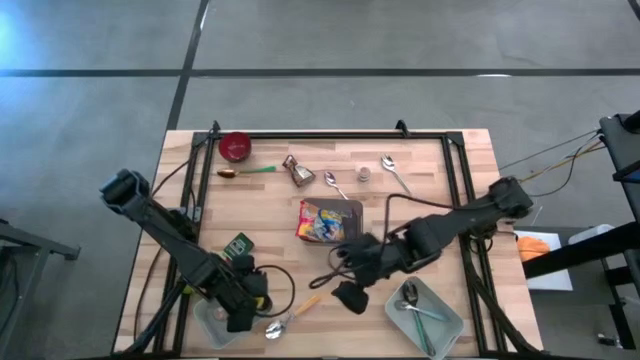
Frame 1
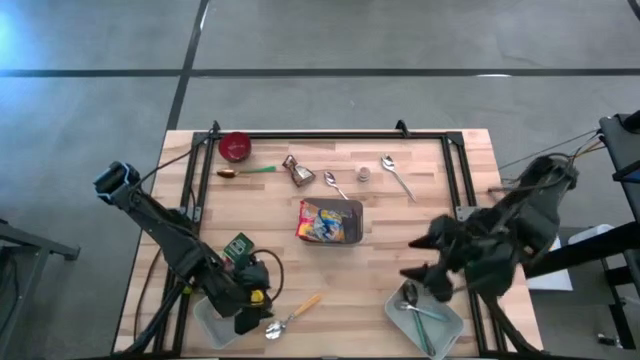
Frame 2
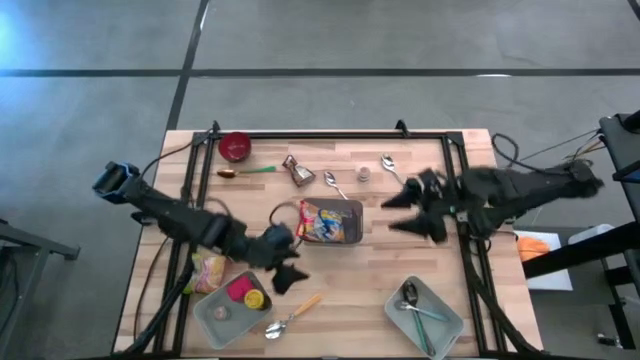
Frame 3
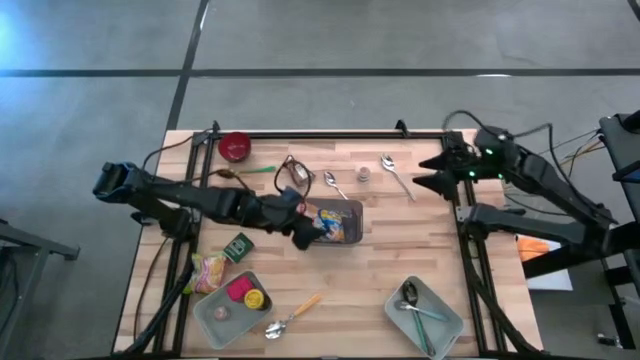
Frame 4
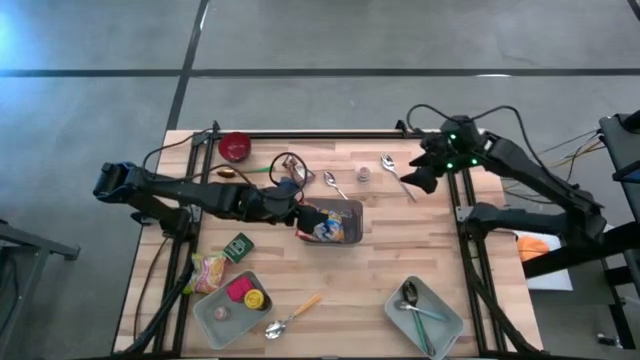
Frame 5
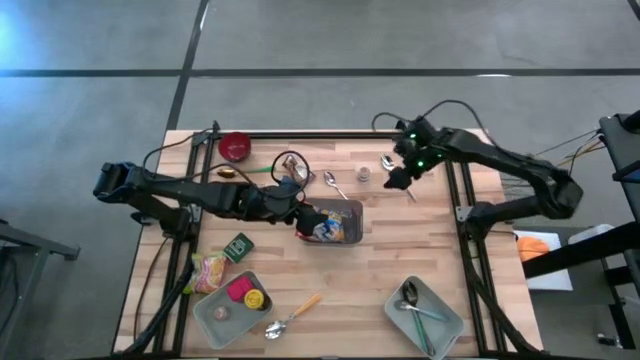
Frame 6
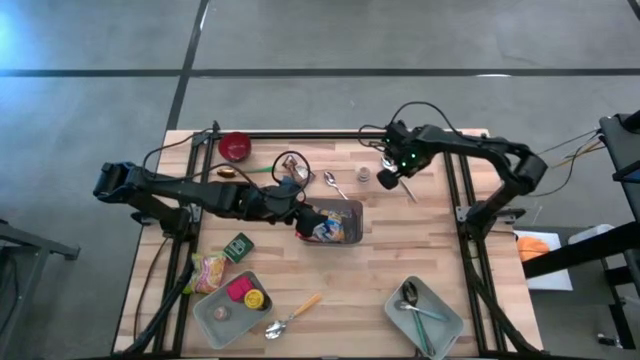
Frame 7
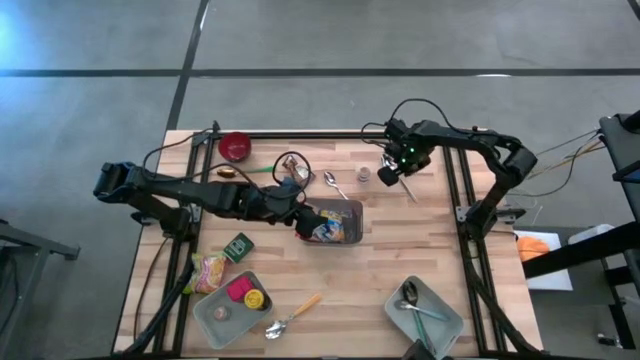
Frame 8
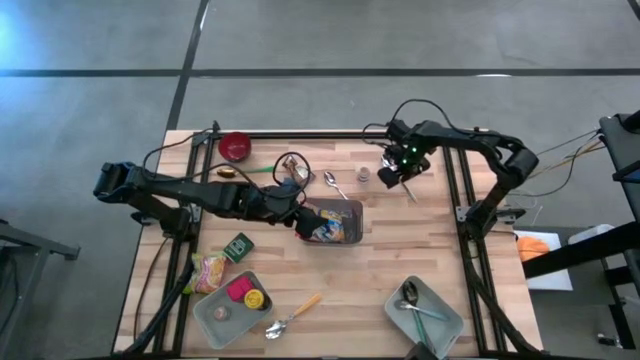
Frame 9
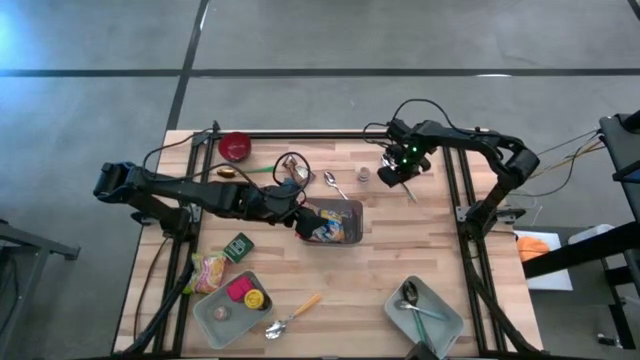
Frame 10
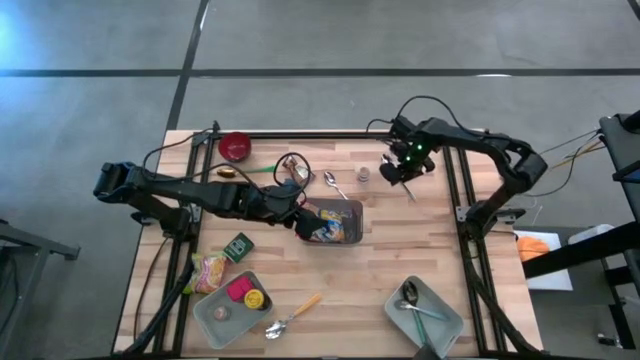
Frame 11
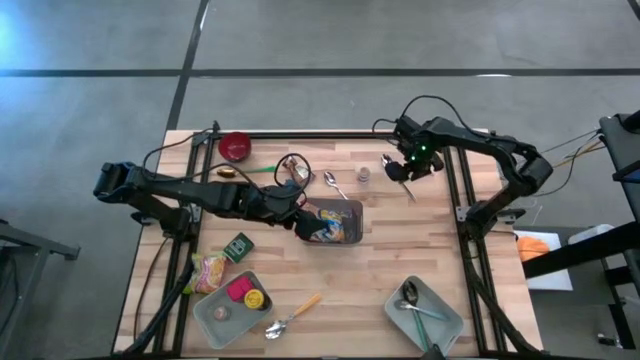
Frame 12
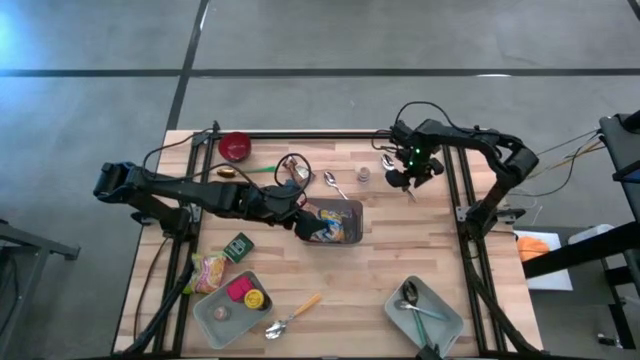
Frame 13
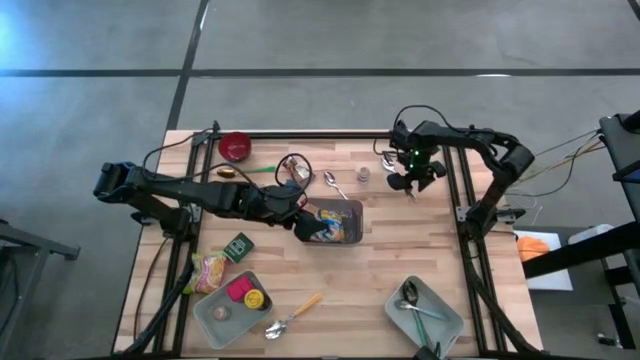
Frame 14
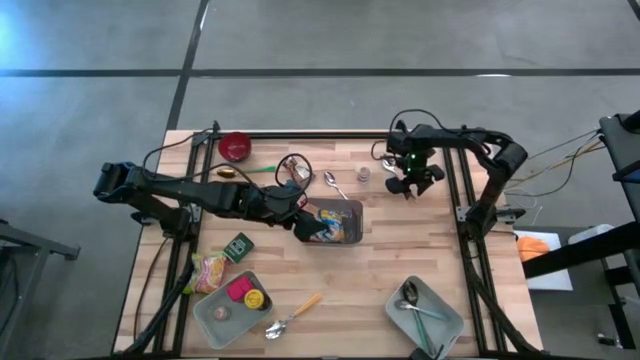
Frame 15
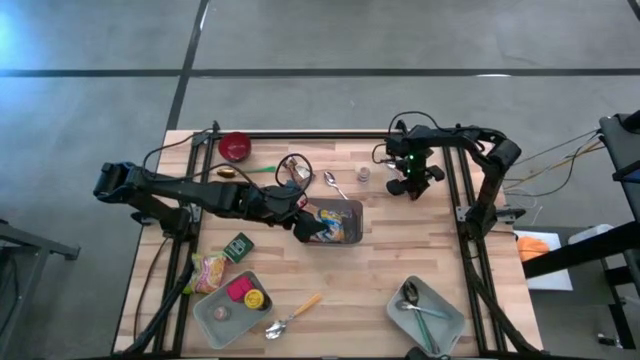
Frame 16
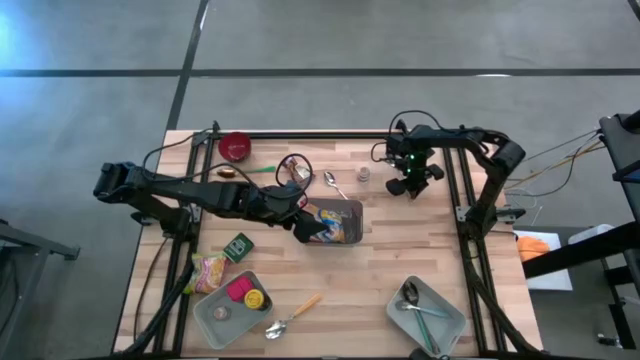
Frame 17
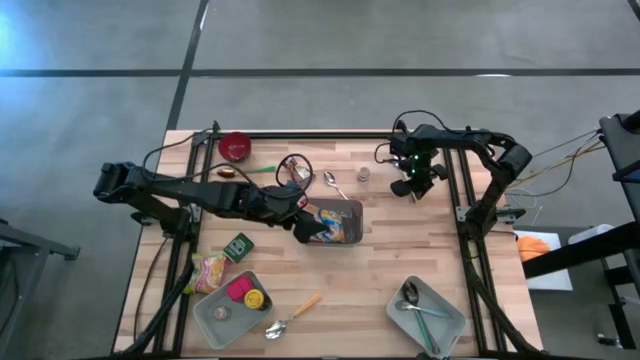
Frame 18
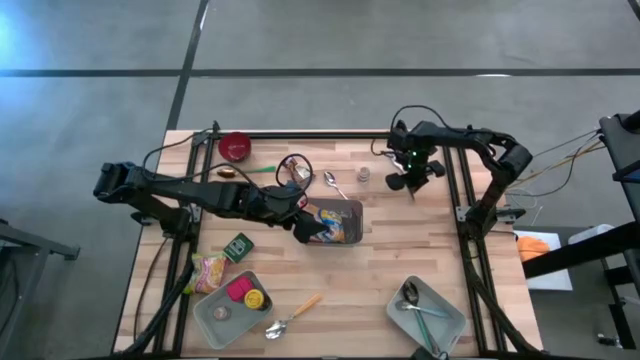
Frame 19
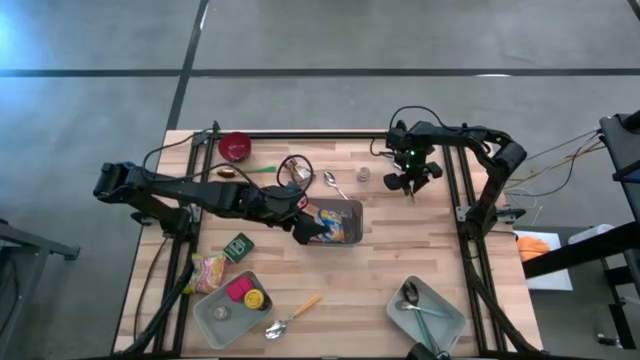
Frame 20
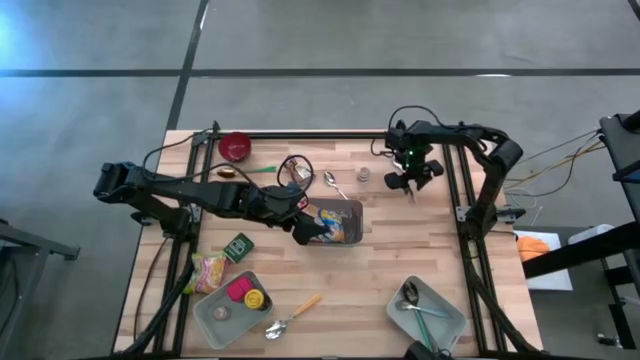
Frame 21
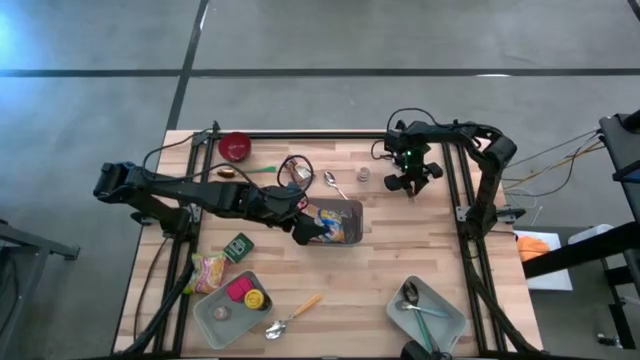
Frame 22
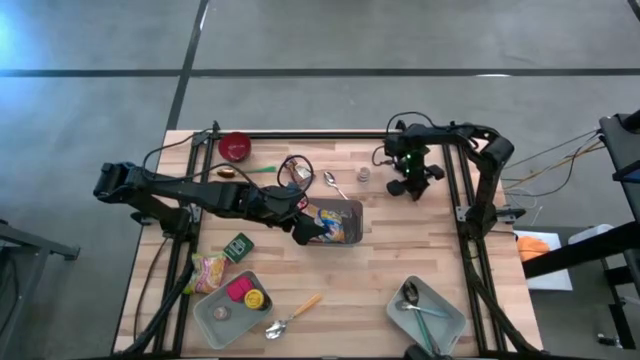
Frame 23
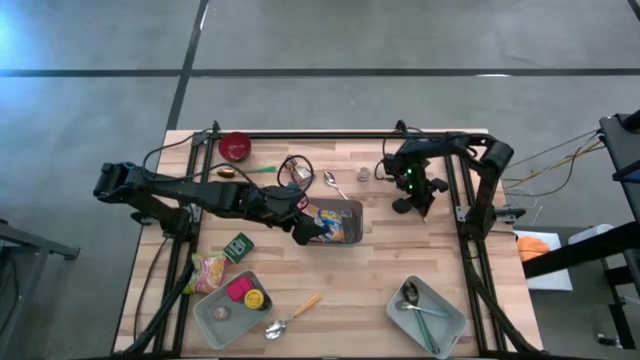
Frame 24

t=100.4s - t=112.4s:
Put the silver spoon into the right grey bin

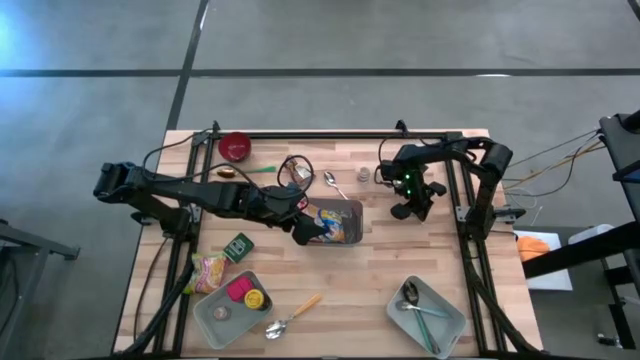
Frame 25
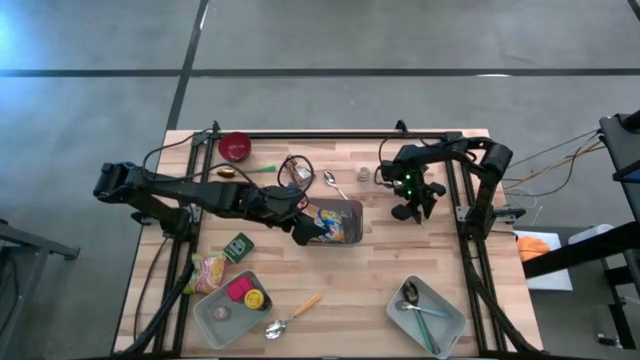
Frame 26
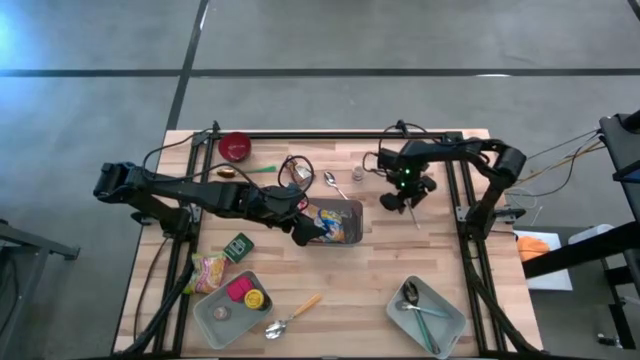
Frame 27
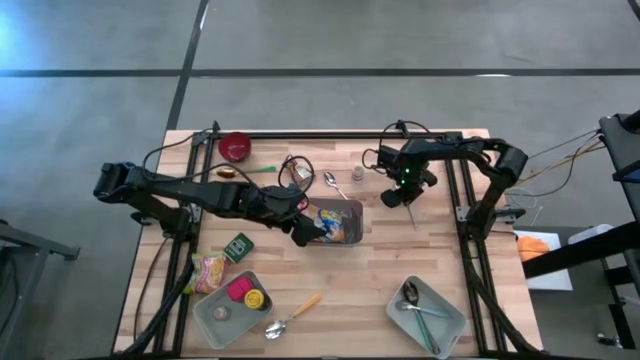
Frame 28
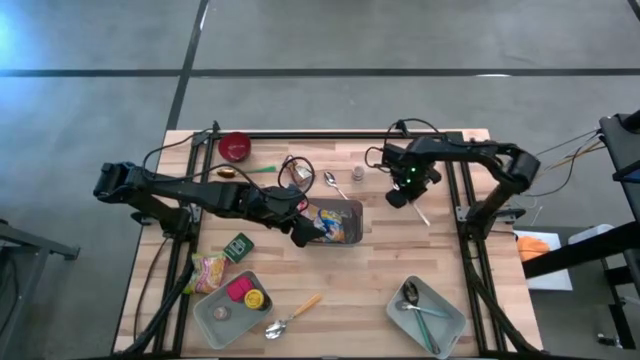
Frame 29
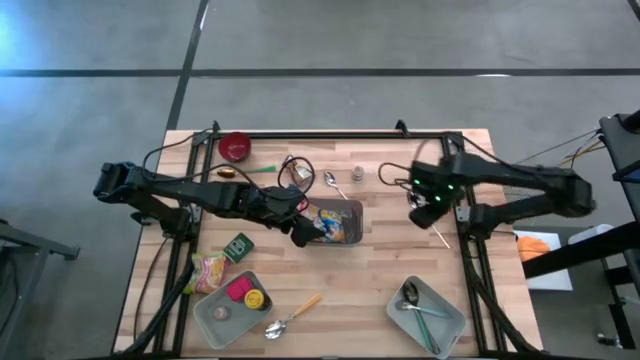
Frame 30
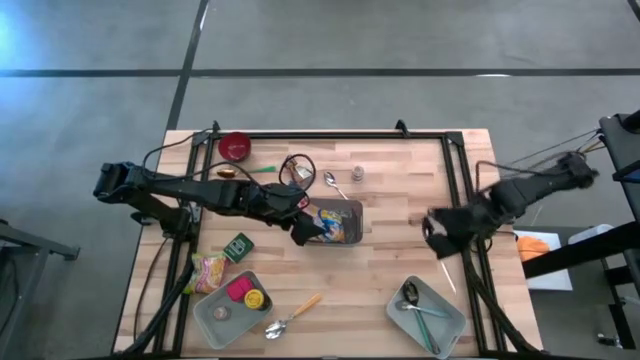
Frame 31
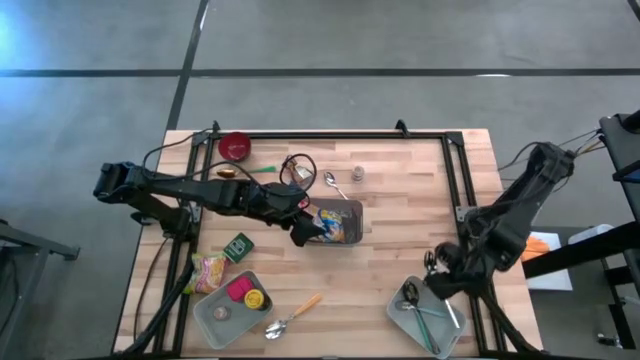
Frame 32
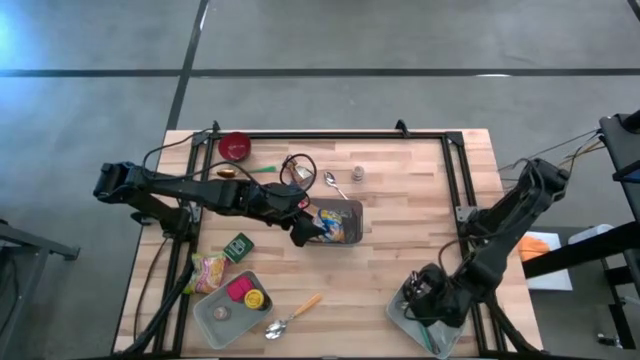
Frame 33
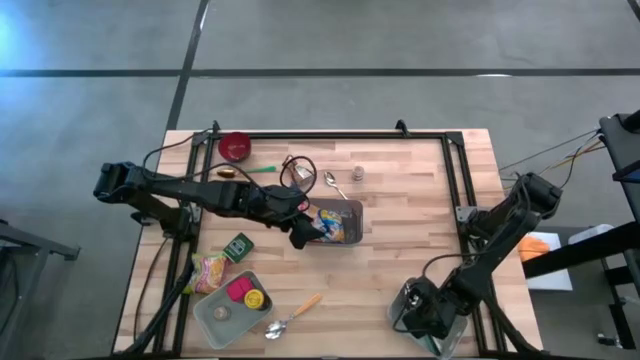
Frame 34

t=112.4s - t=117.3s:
Put the silver spoon into the right grey bin

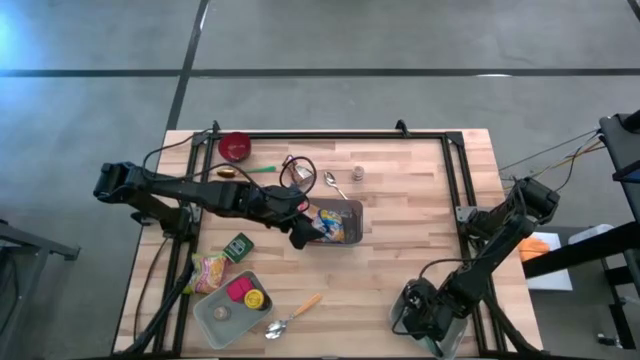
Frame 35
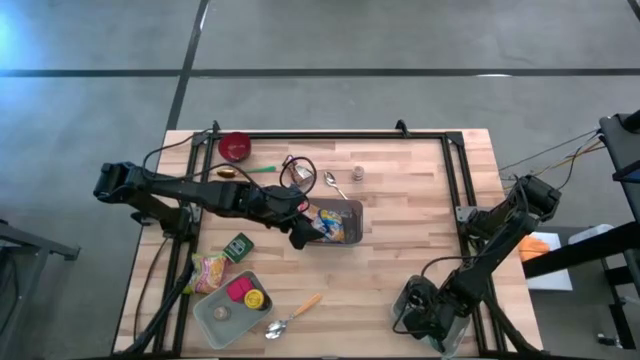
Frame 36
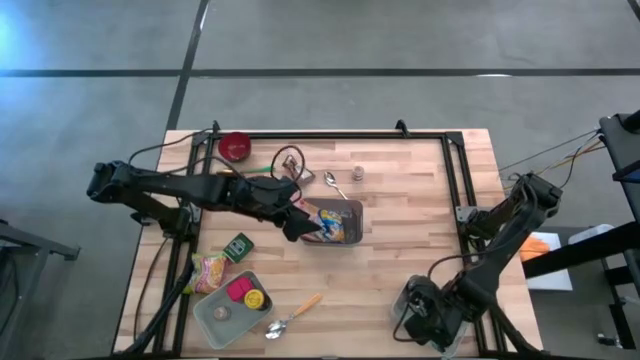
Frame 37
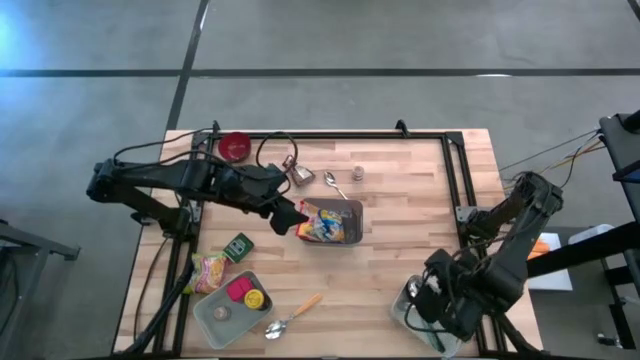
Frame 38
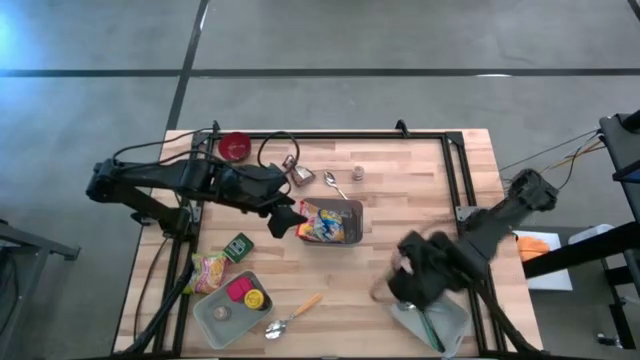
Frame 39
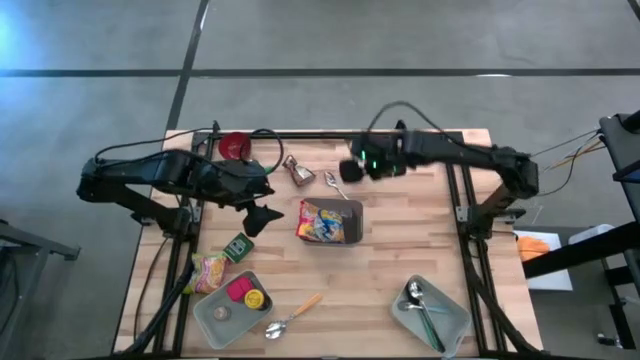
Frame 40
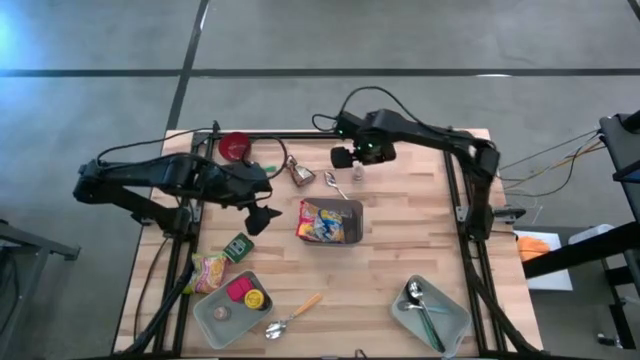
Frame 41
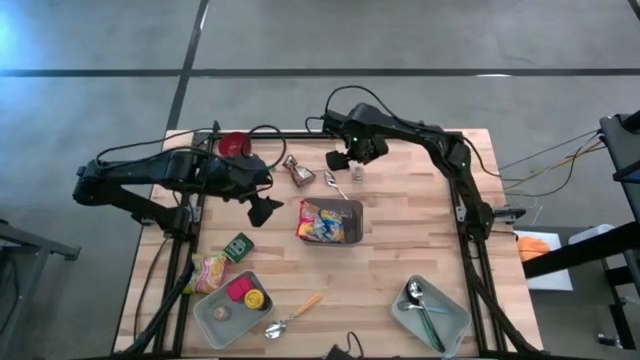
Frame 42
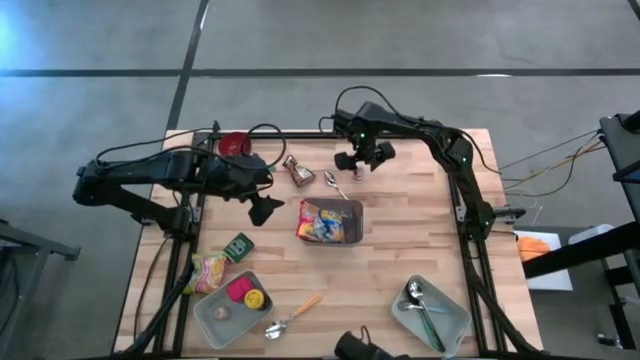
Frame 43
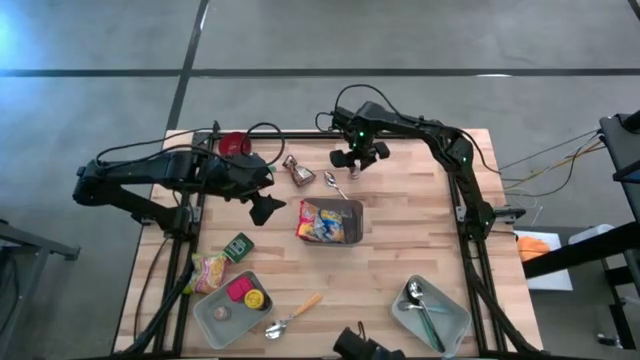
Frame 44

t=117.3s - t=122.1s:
Put the brown spice bottle into the left grey bin
